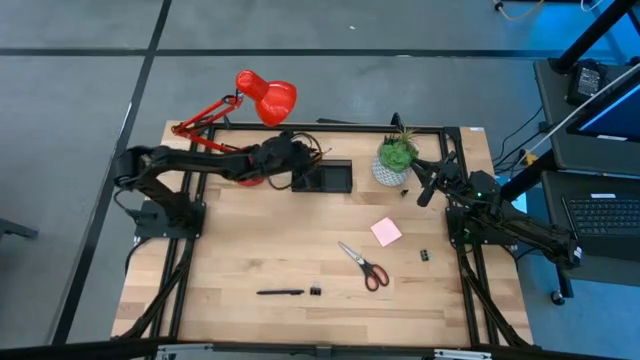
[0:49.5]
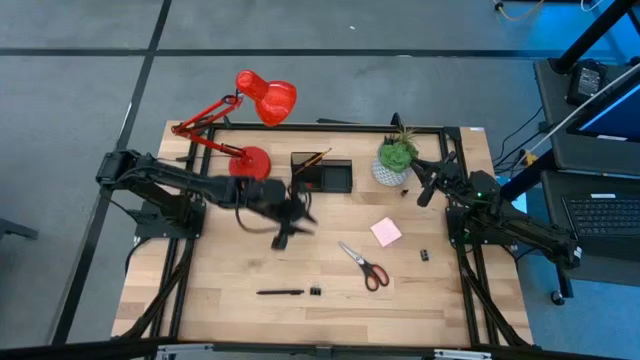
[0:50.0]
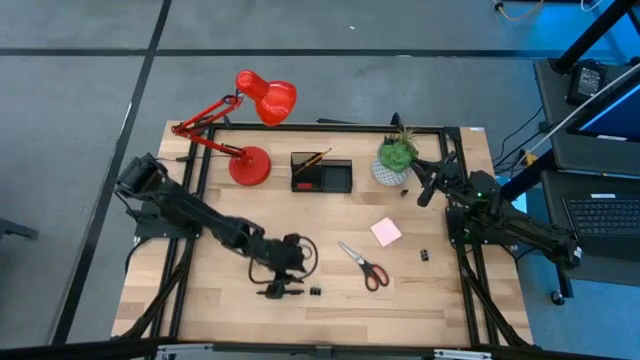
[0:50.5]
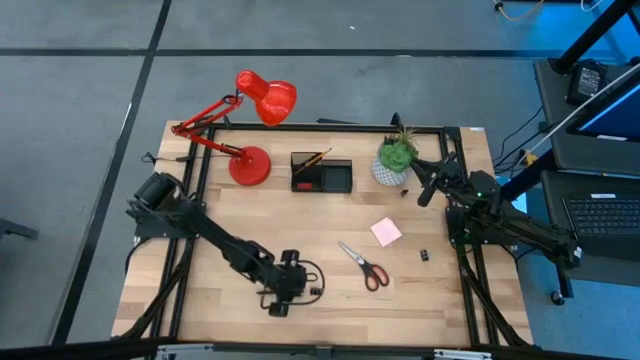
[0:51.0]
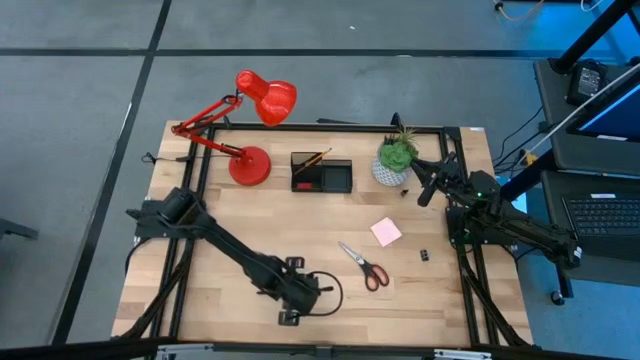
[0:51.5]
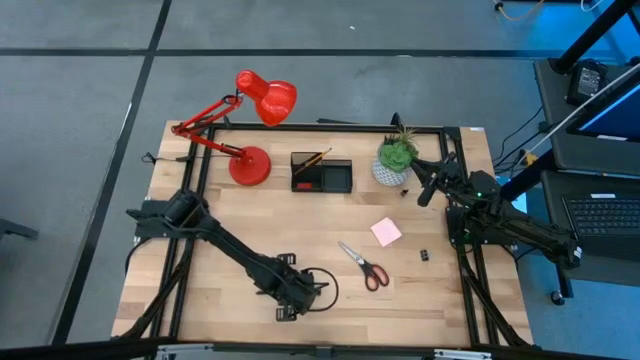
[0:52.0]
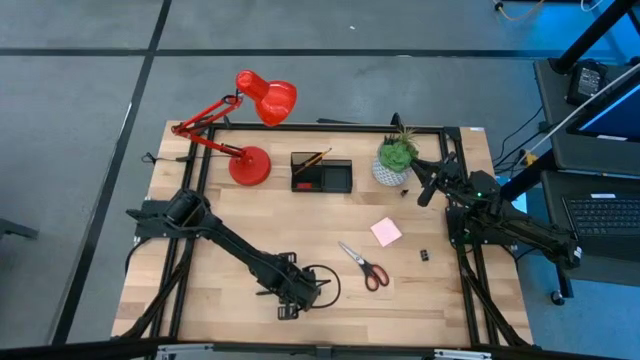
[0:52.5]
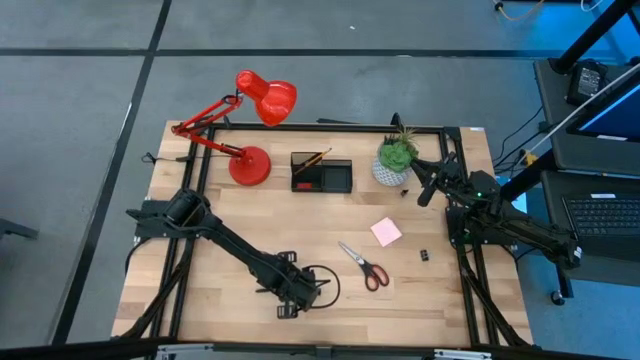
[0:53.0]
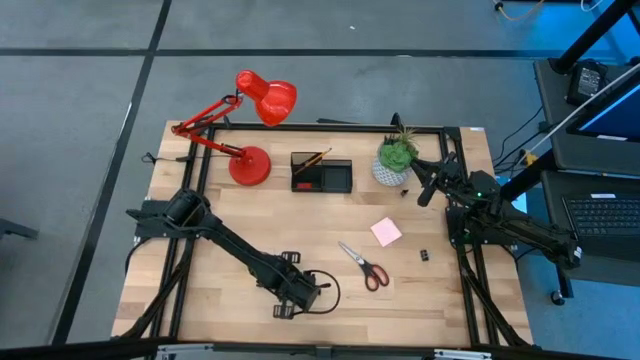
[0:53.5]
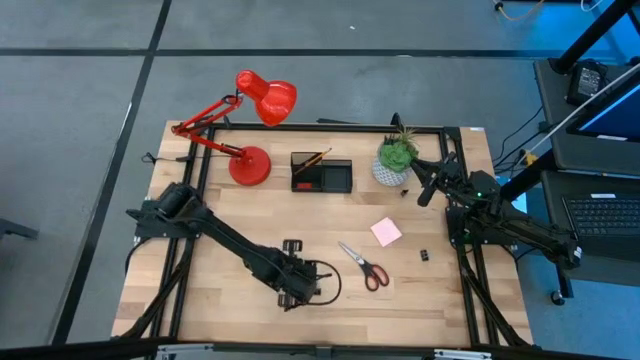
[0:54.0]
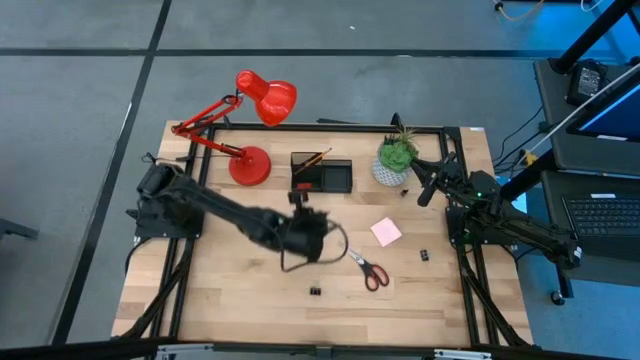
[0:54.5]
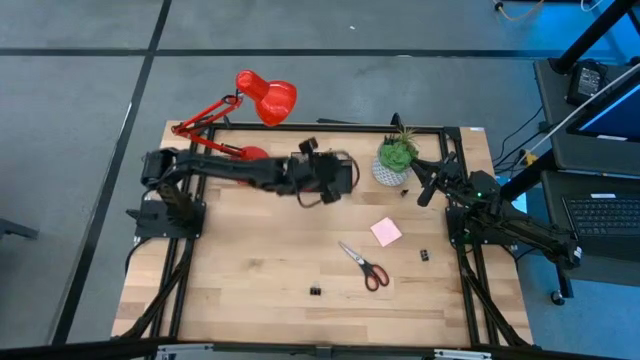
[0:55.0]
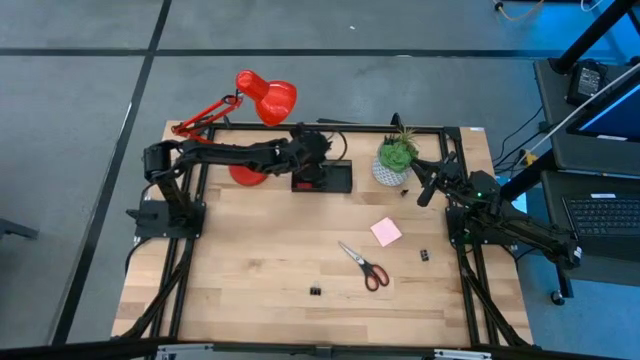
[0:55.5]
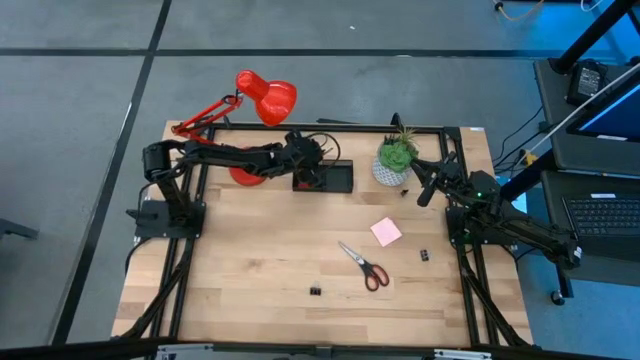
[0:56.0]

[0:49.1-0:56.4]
Task: Pick and place office supplies into organizer
Put the pen into the desk organizer

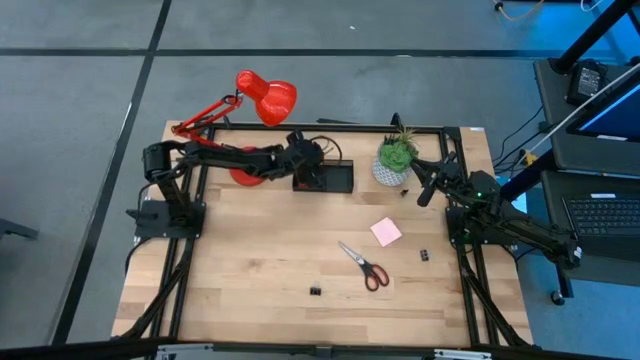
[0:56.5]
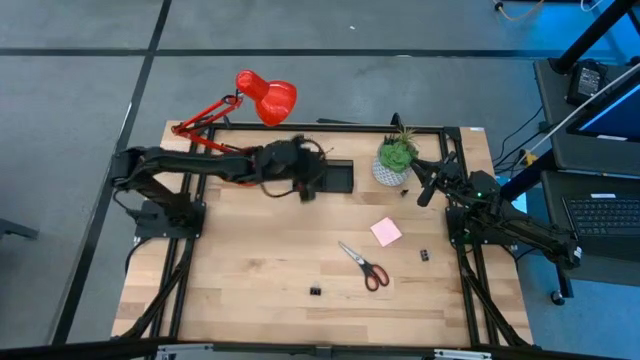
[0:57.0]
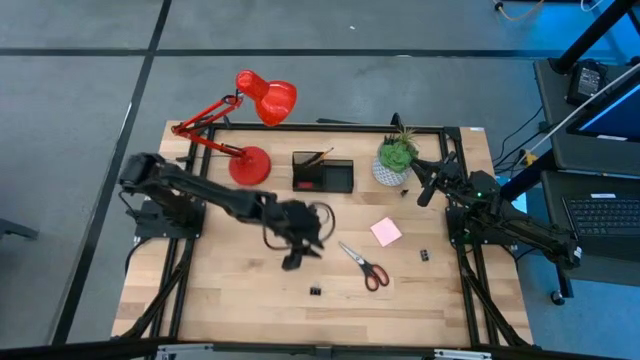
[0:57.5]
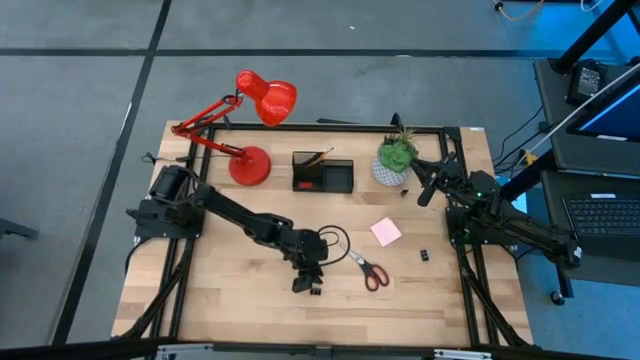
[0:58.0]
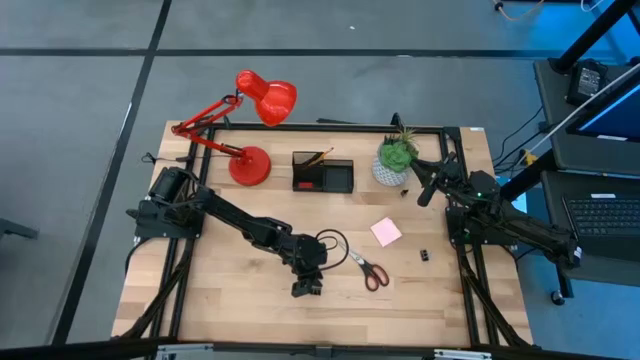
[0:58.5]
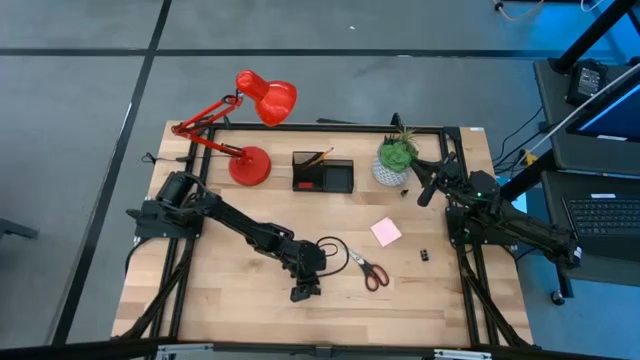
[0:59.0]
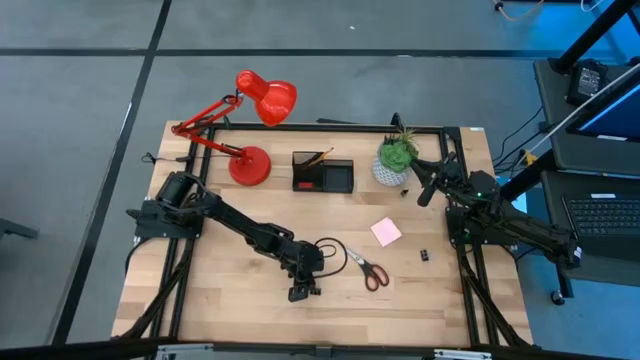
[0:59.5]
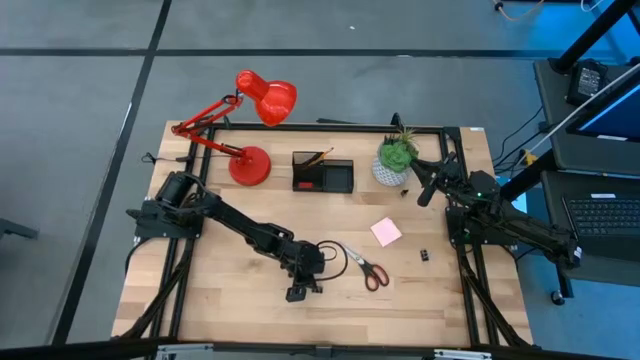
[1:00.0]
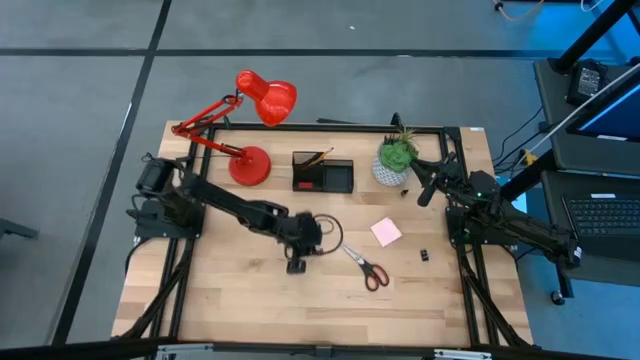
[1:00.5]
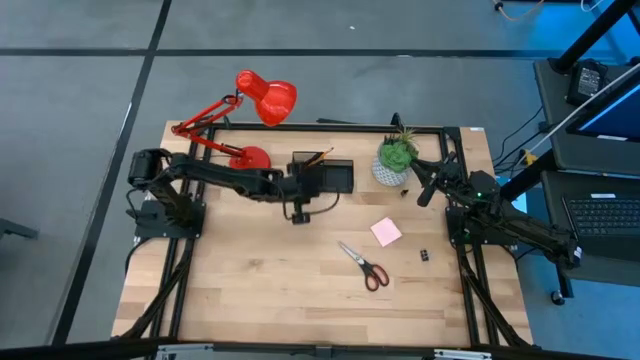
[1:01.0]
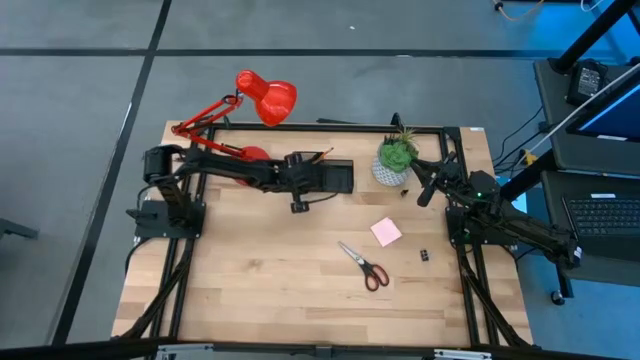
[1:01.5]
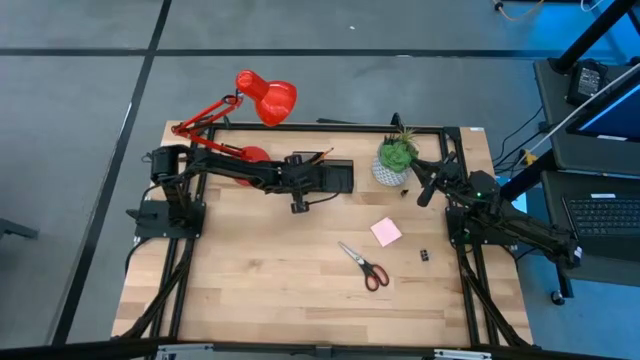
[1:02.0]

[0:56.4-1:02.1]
Put the bottom left binder clip into the desk organizer

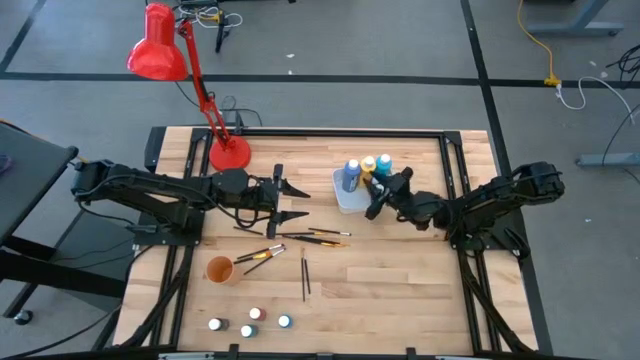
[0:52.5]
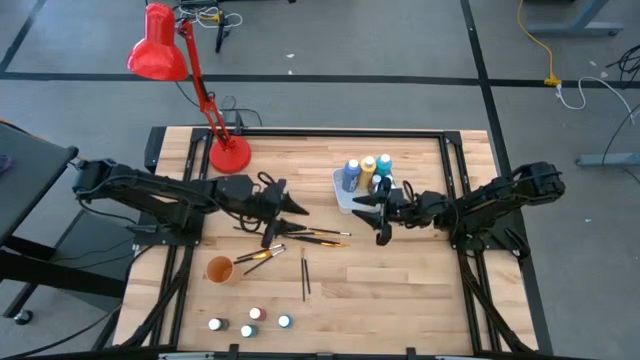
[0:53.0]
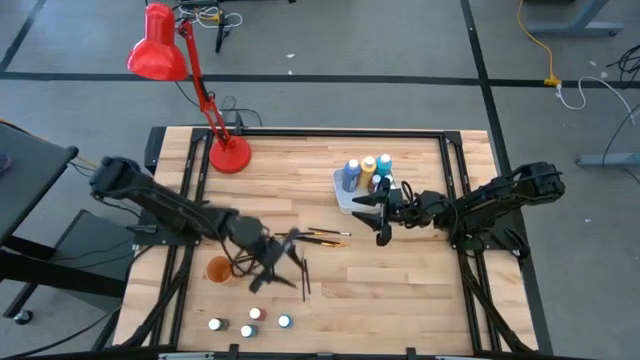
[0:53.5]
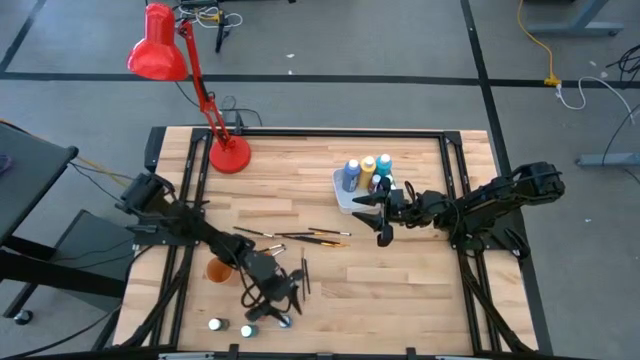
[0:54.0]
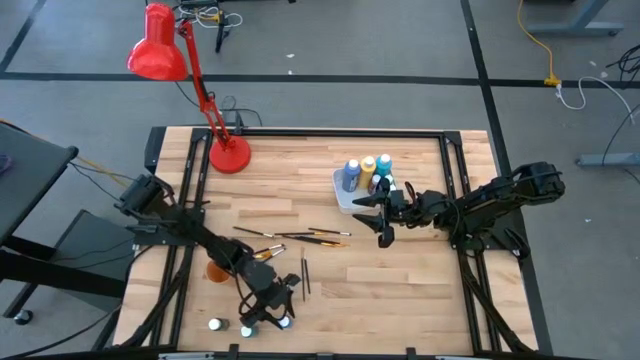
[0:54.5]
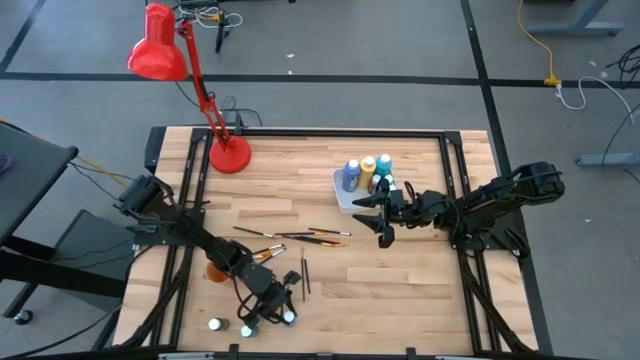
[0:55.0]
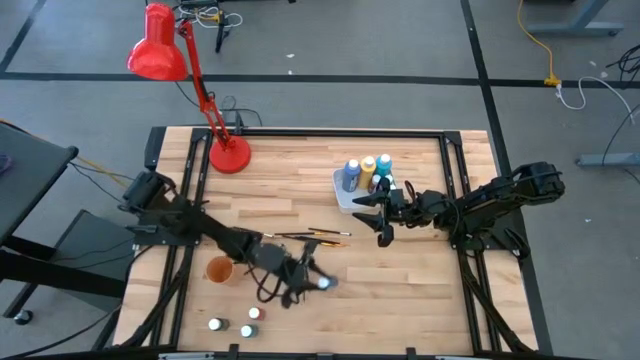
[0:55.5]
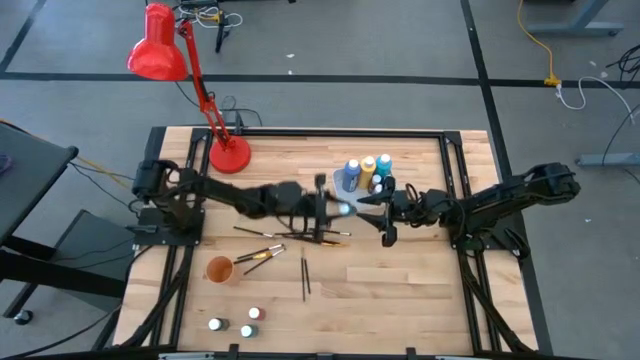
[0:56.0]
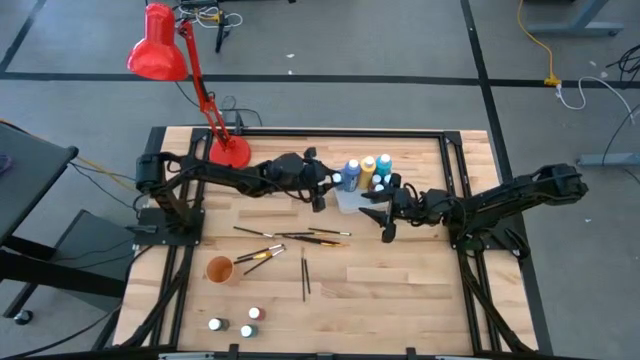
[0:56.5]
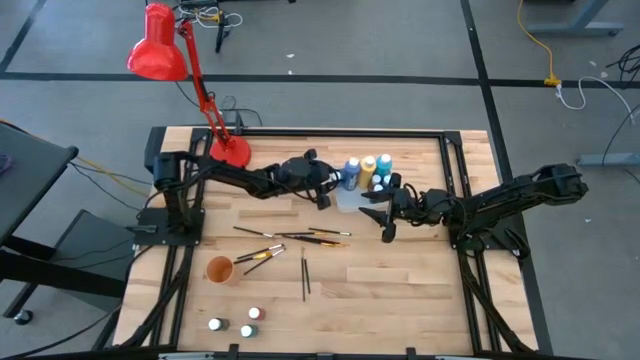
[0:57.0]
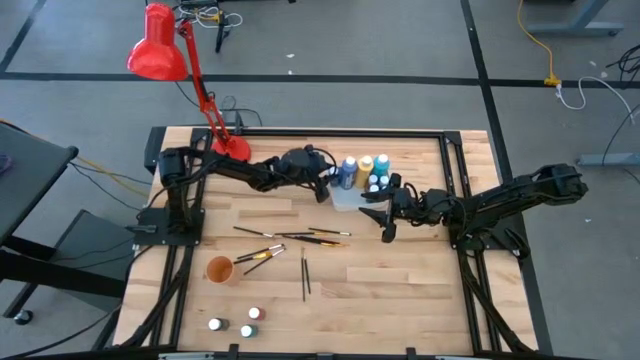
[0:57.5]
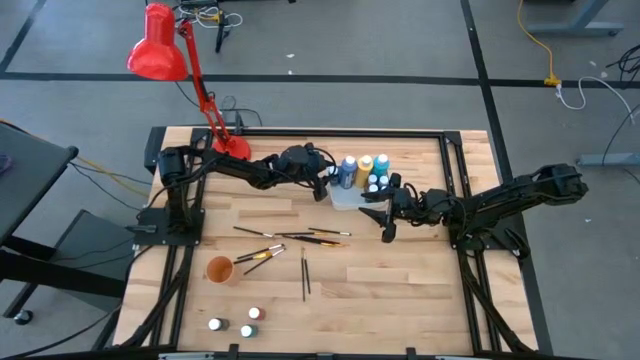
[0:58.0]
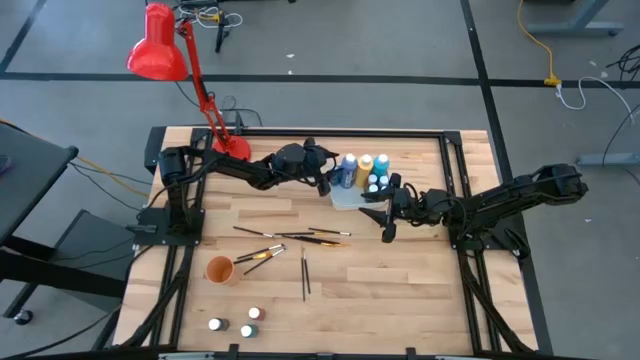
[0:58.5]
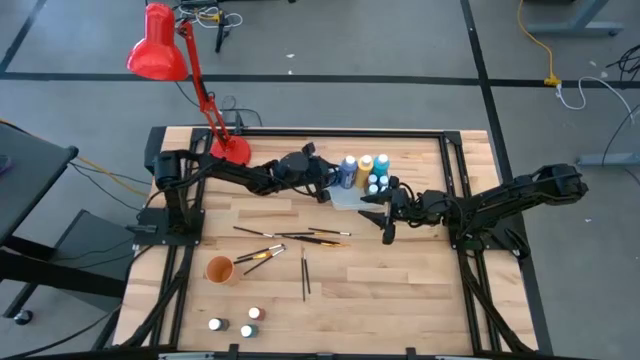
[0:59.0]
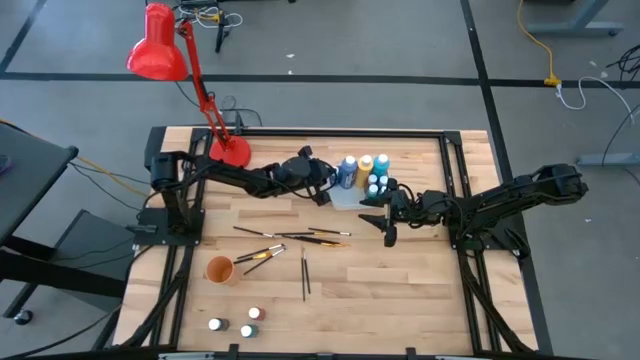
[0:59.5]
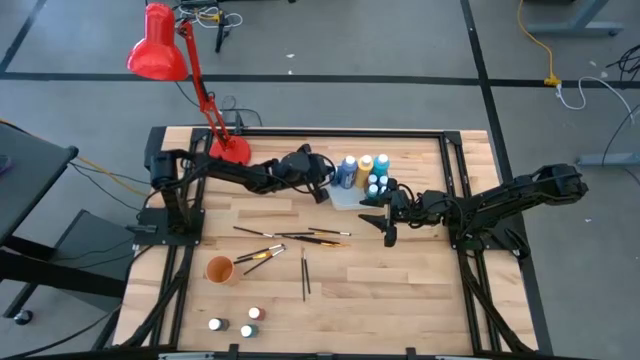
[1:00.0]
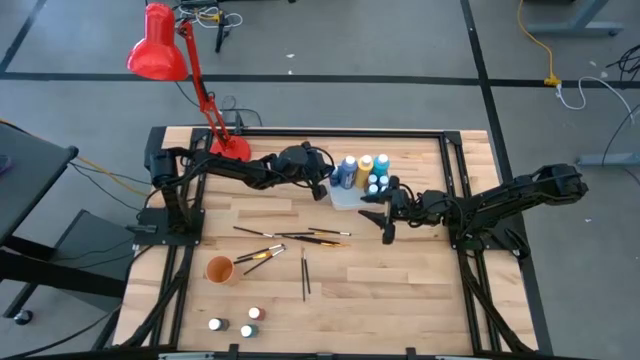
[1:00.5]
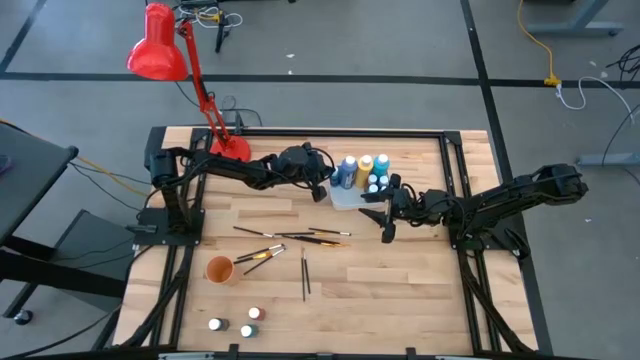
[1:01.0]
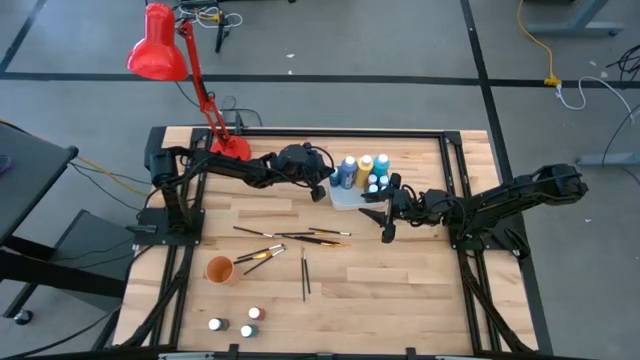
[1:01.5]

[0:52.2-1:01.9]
Task: Pick & Place Paint Supplies
Put the small blue paint bottle into the white bin
